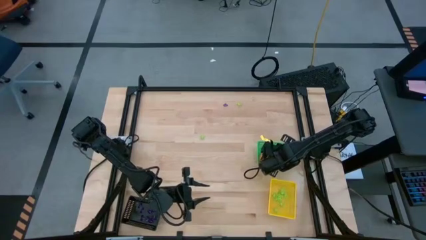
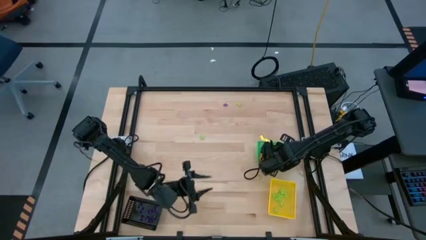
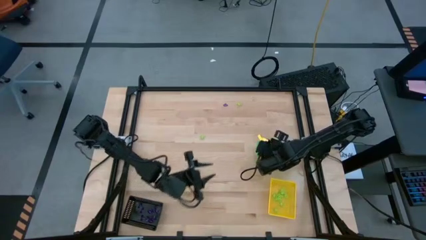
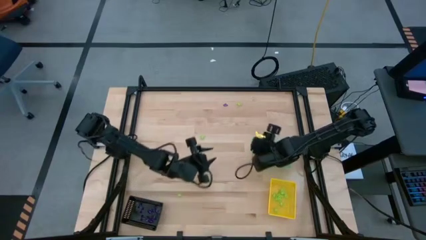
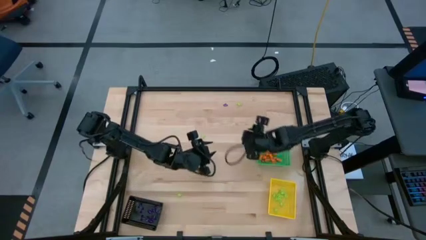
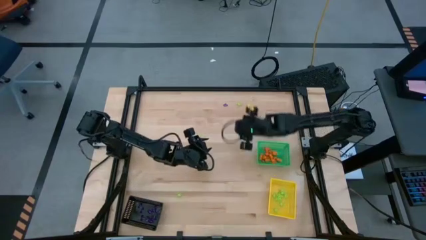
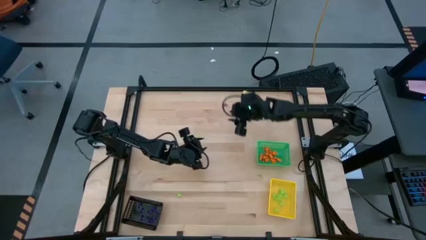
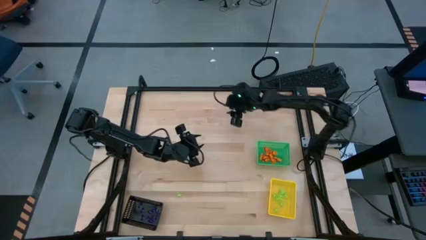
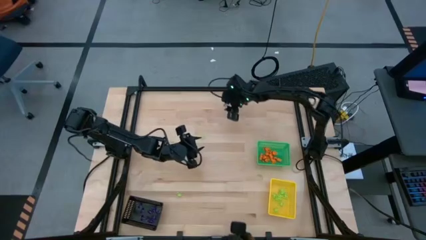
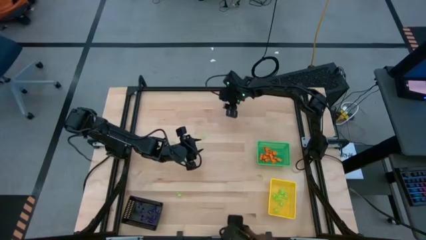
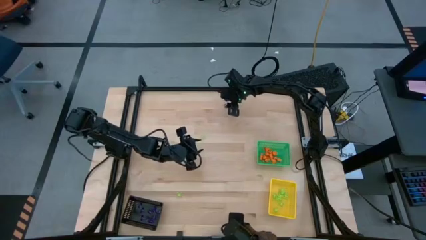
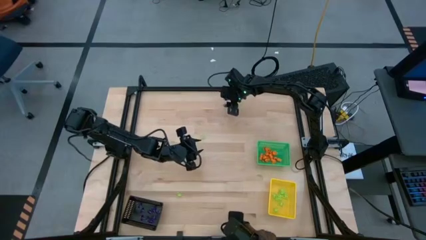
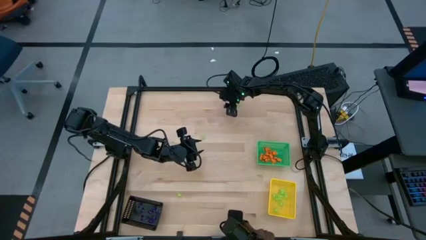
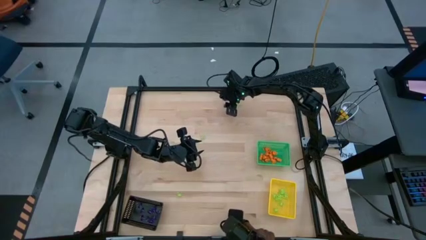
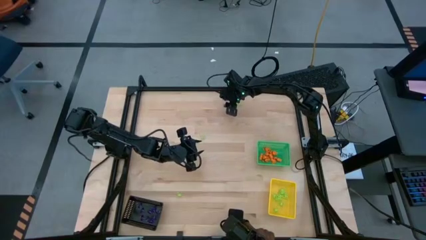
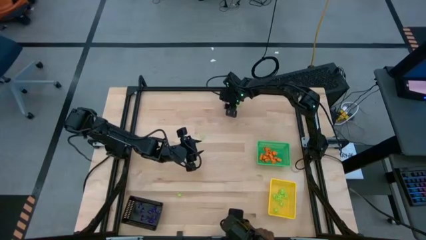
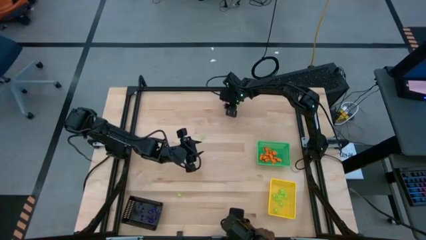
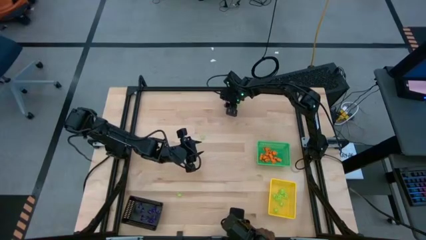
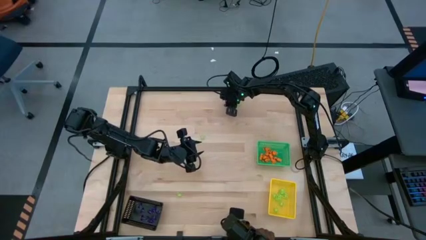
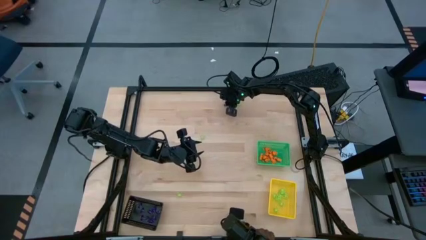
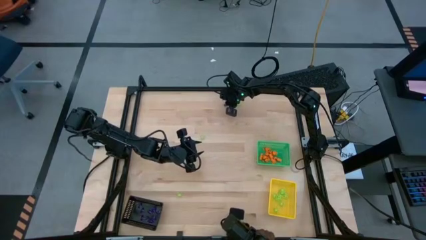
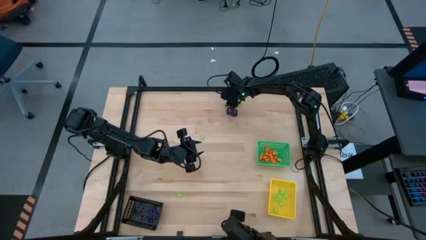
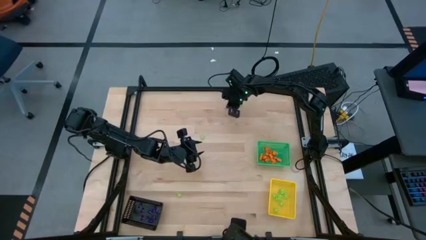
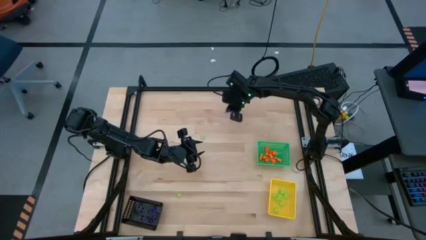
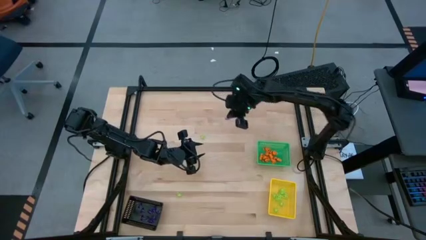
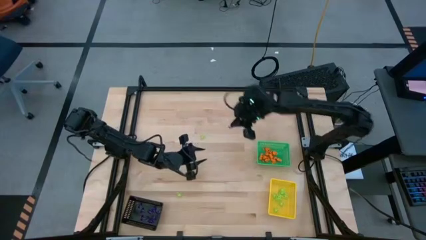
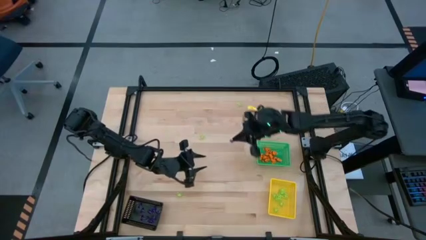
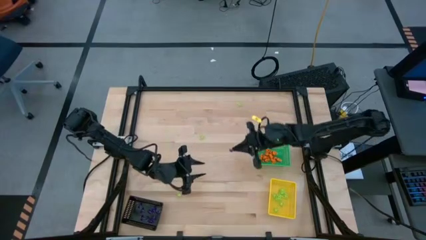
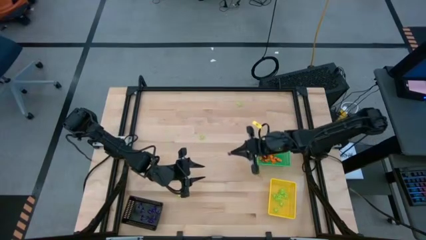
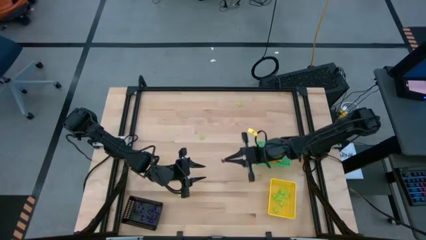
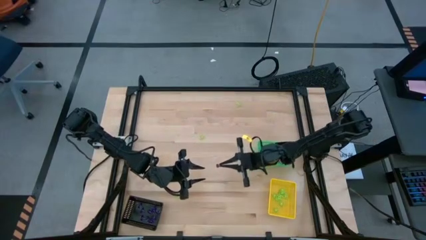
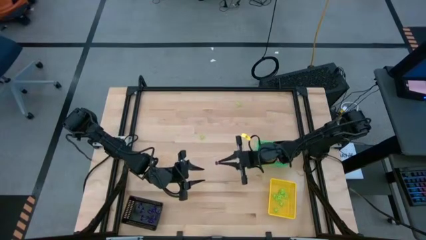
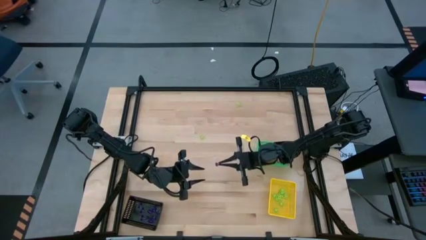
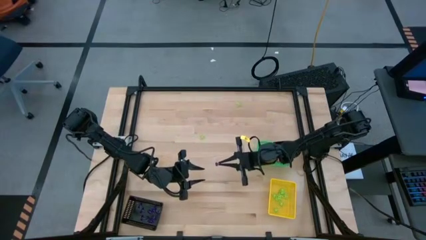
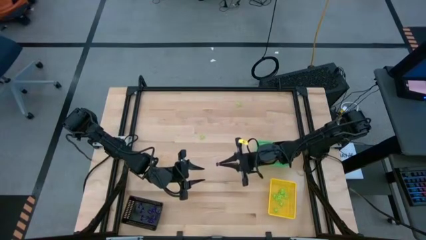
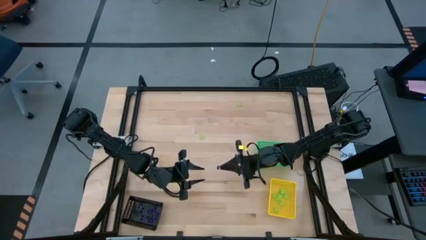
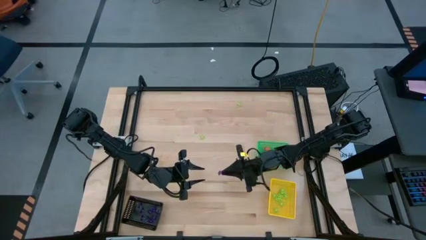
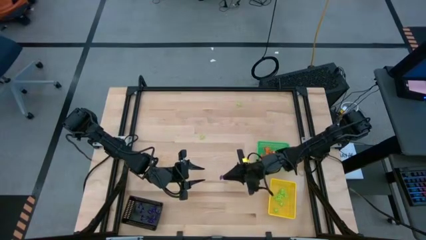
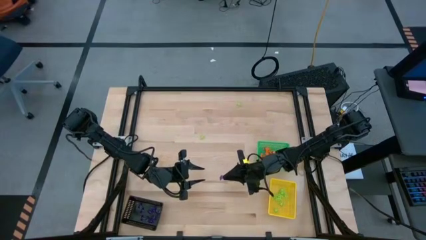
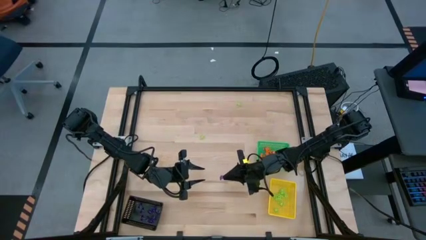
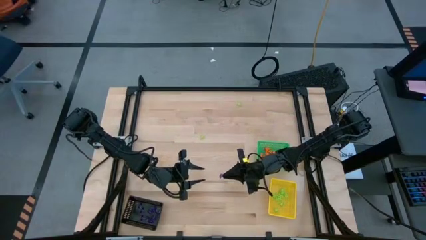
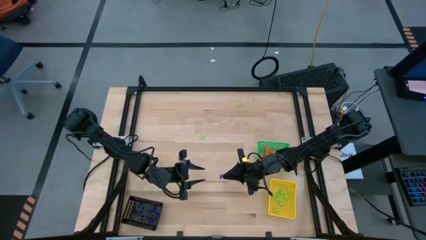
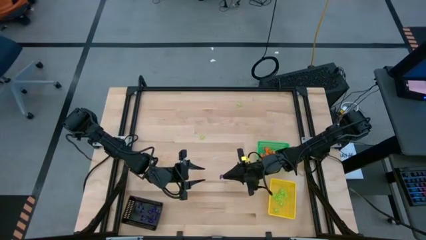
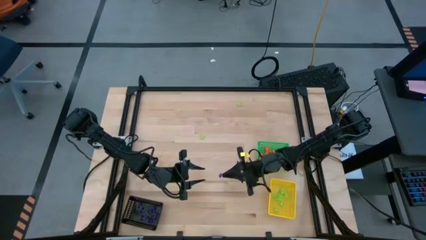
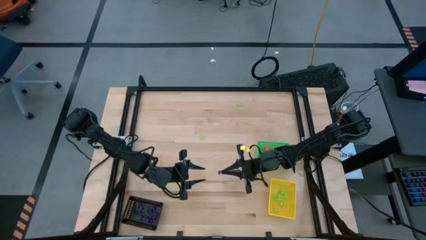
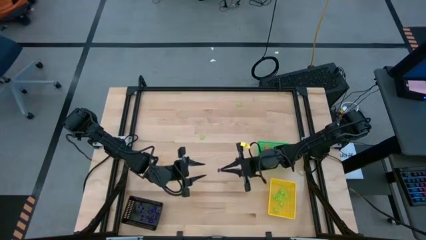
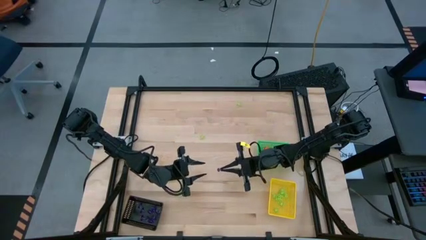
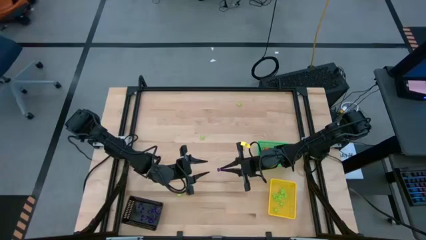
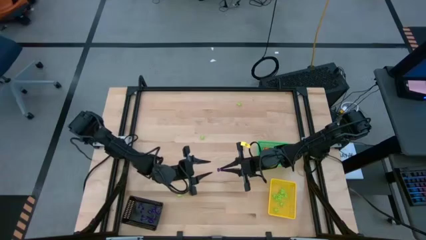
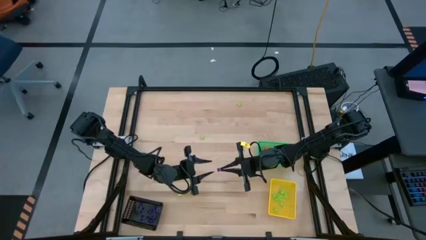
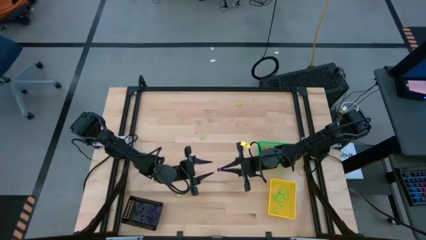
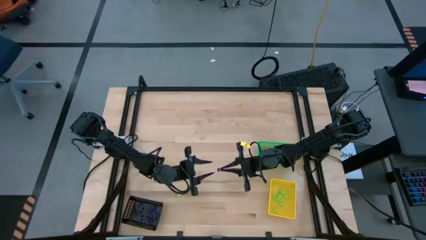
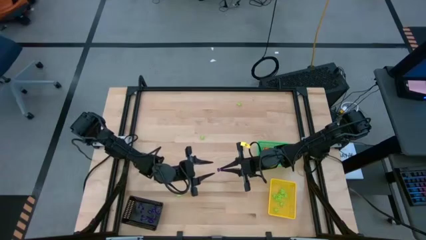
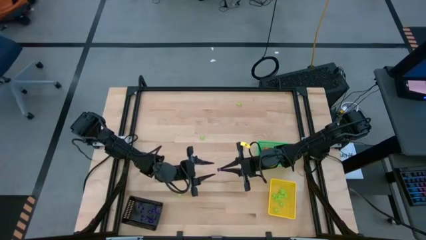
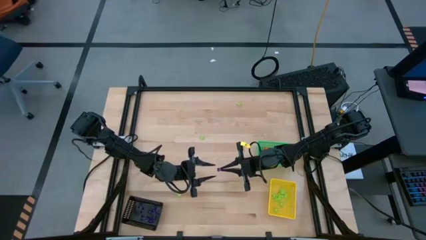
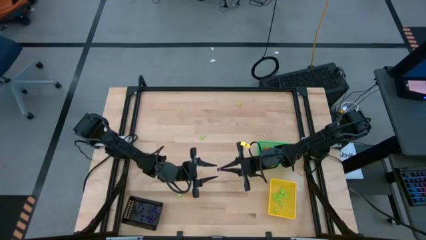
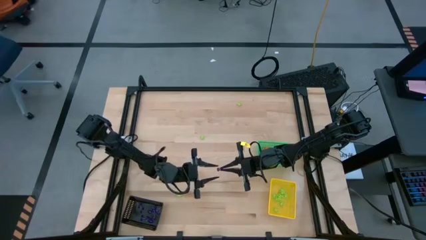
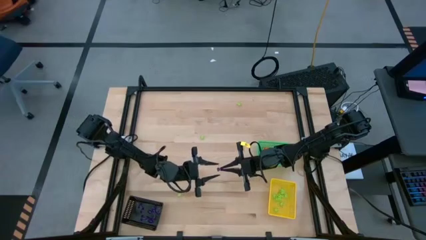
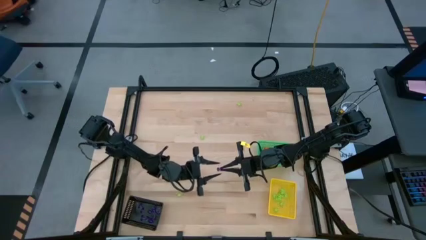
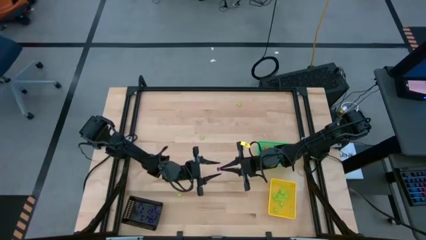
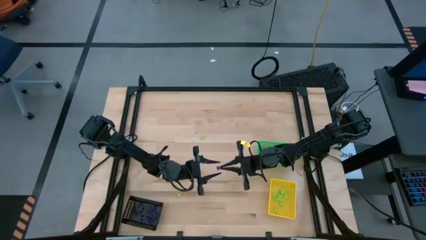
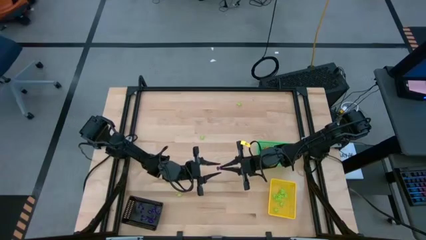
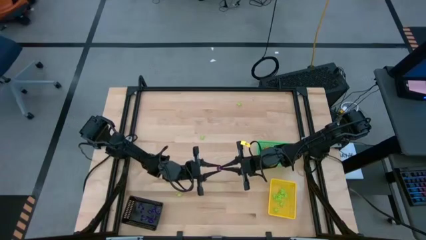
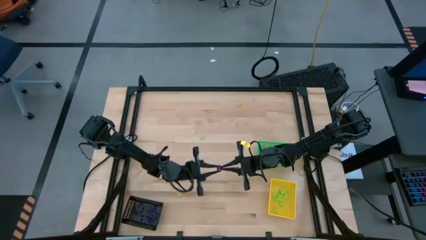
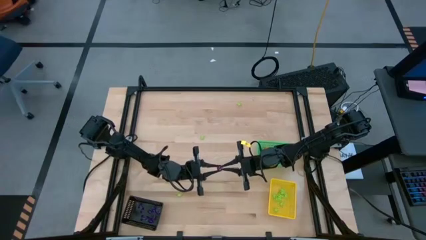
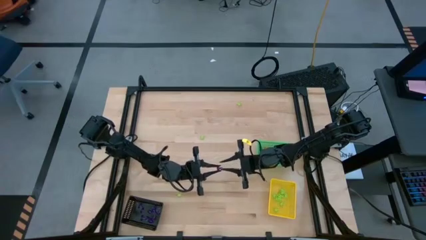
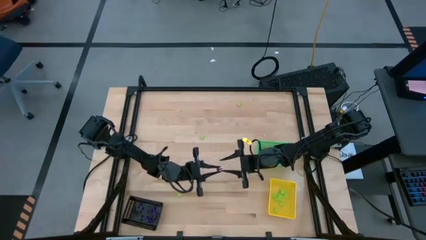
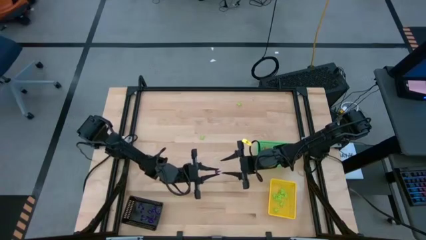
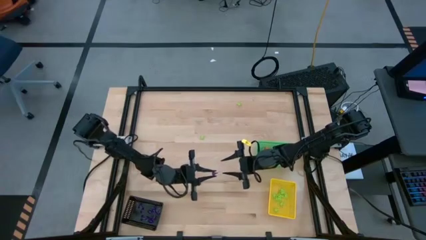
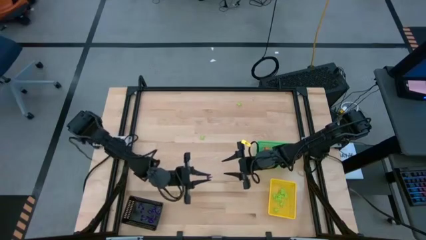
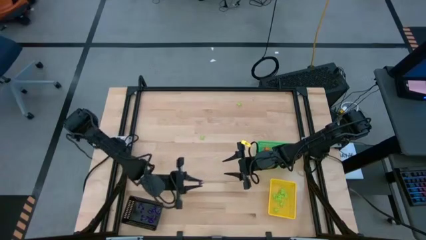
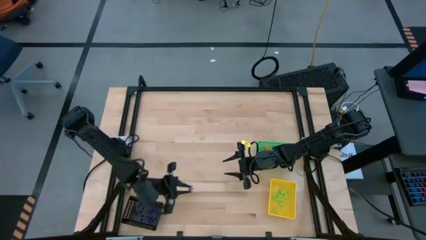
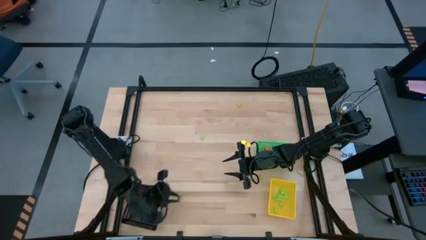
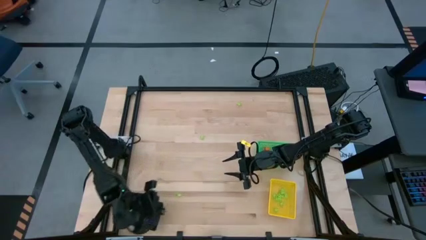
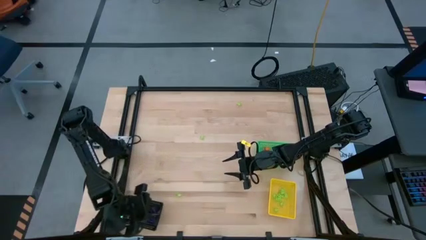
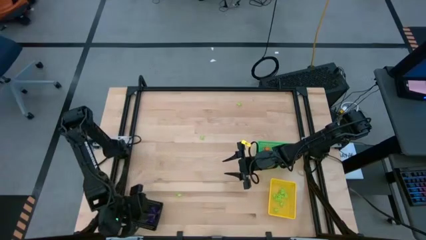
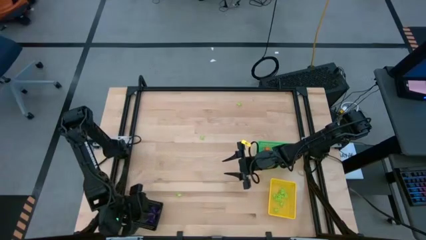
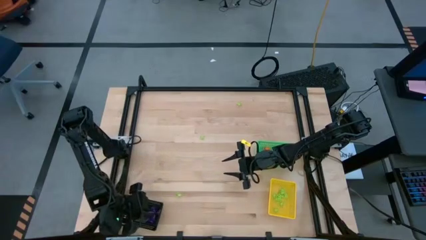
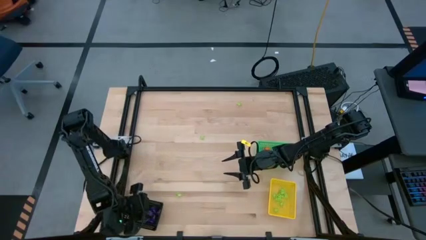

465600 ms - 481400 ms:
Task: Sort Halloween decoration
Put the purple witch hat toy into the black bin
